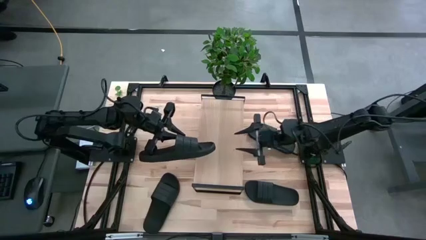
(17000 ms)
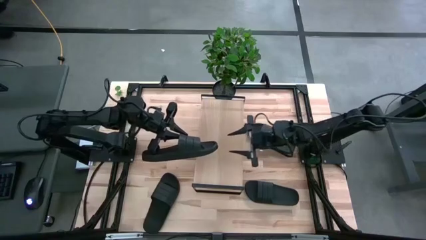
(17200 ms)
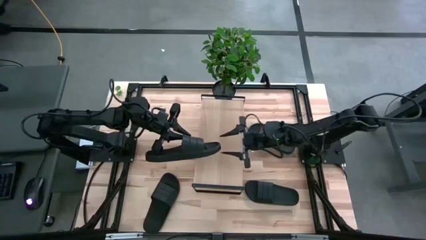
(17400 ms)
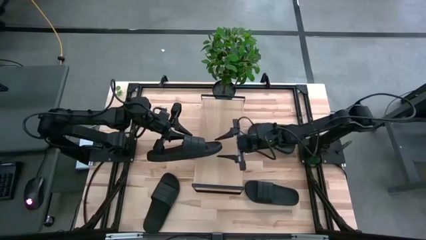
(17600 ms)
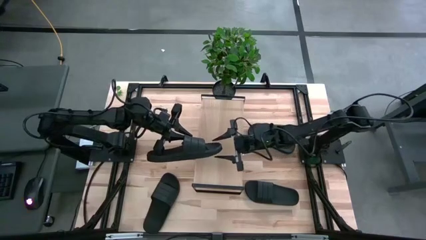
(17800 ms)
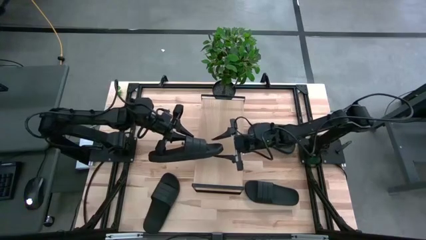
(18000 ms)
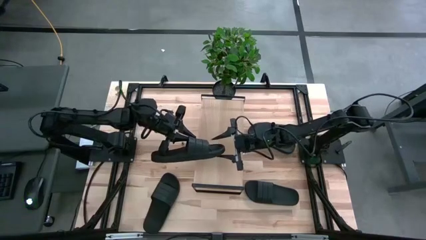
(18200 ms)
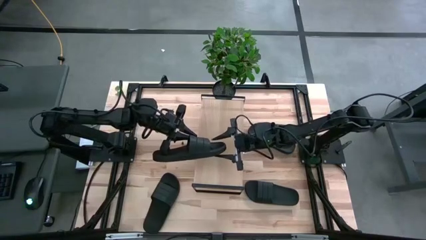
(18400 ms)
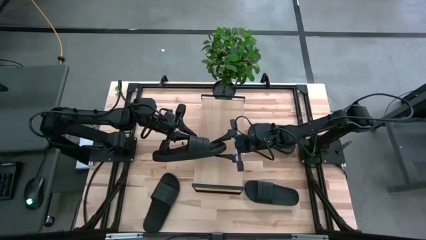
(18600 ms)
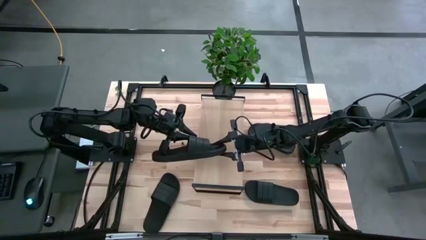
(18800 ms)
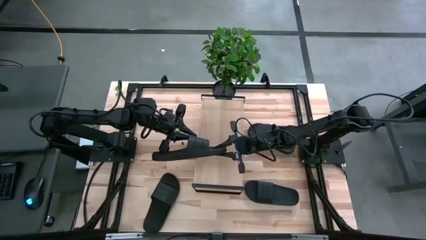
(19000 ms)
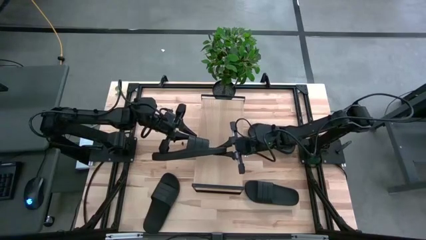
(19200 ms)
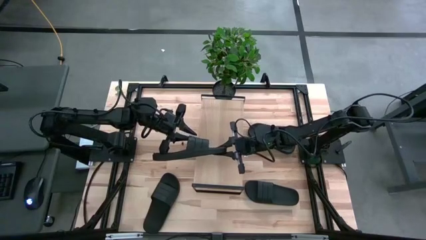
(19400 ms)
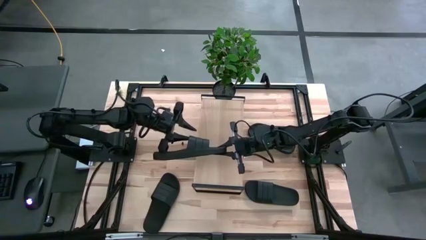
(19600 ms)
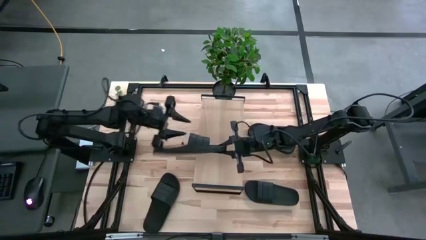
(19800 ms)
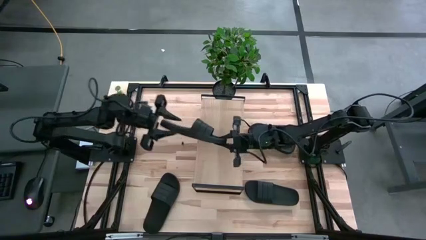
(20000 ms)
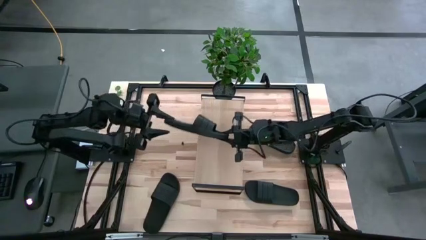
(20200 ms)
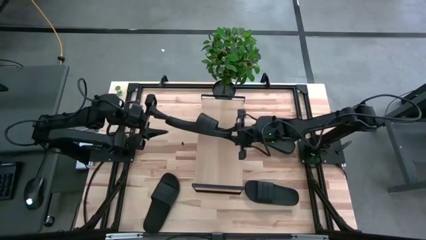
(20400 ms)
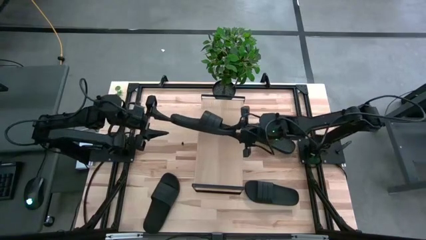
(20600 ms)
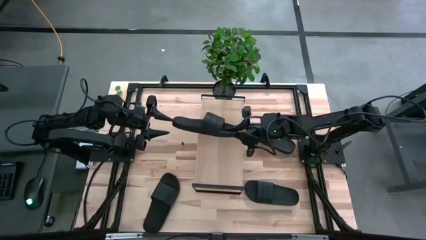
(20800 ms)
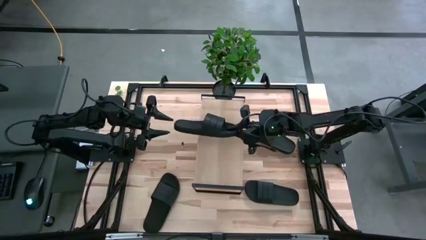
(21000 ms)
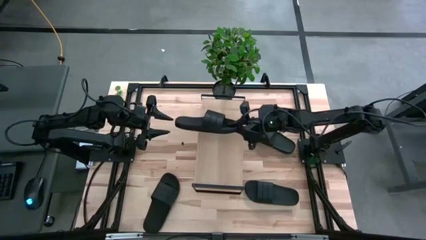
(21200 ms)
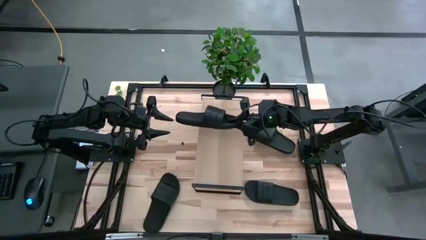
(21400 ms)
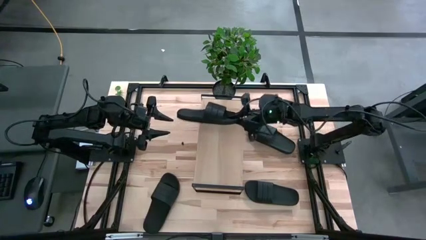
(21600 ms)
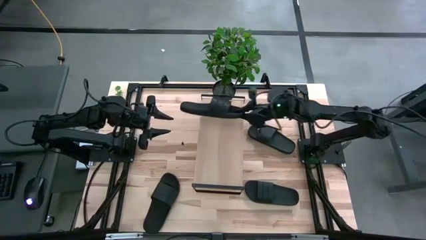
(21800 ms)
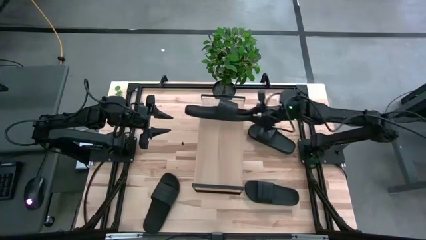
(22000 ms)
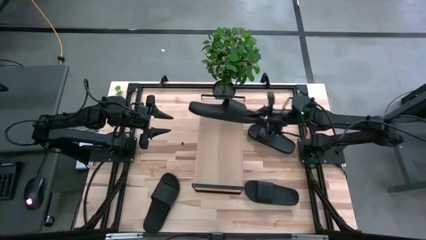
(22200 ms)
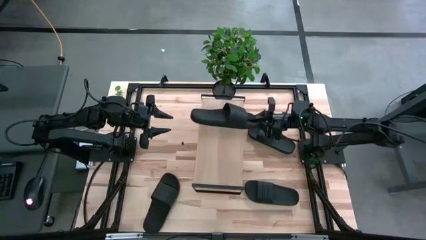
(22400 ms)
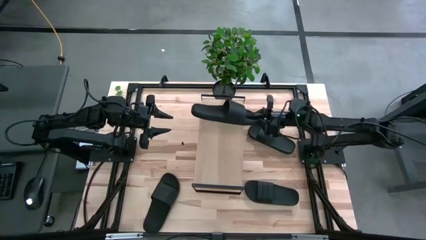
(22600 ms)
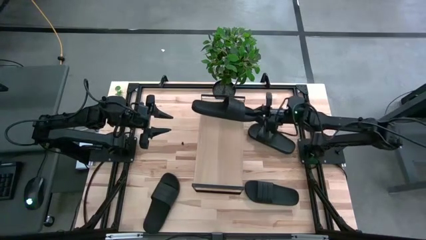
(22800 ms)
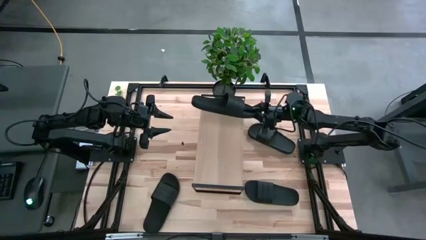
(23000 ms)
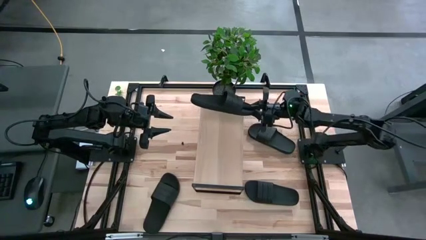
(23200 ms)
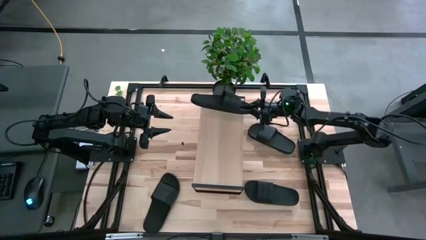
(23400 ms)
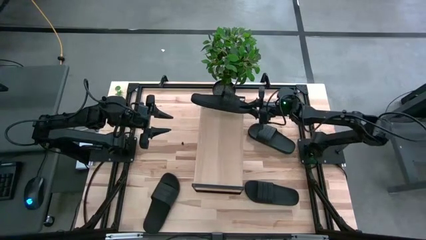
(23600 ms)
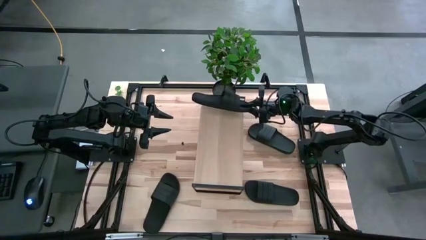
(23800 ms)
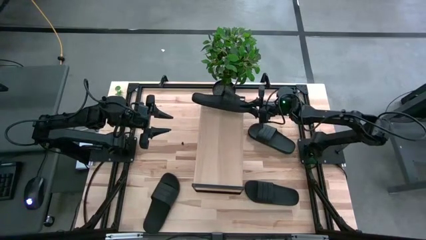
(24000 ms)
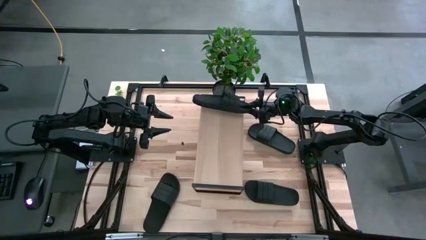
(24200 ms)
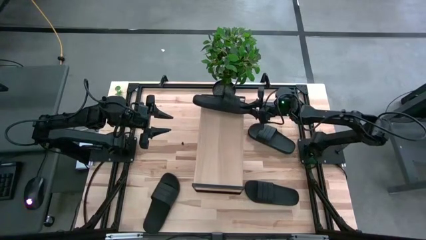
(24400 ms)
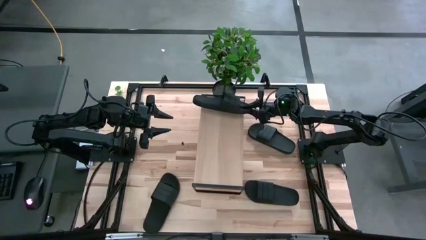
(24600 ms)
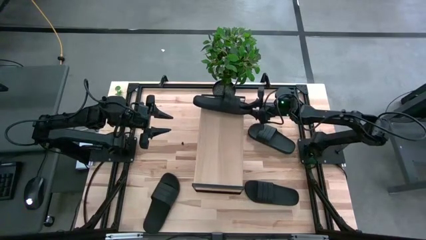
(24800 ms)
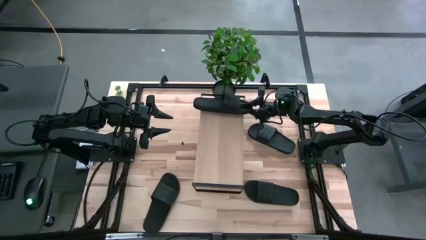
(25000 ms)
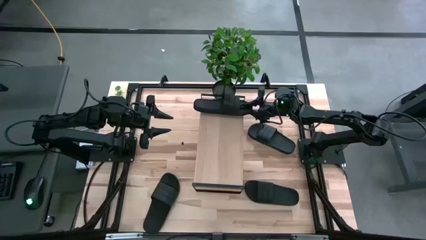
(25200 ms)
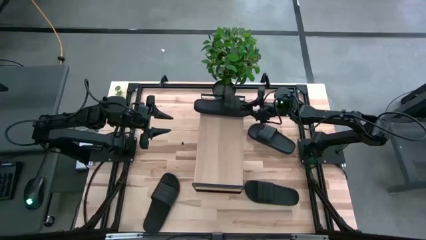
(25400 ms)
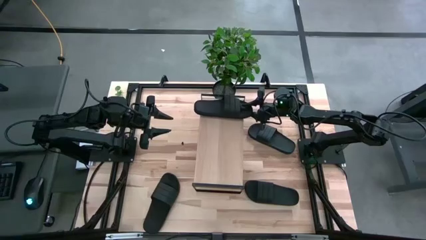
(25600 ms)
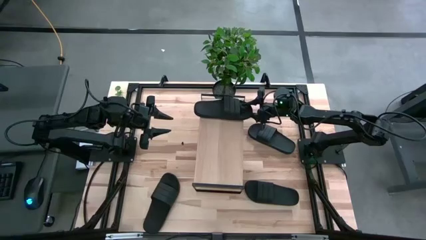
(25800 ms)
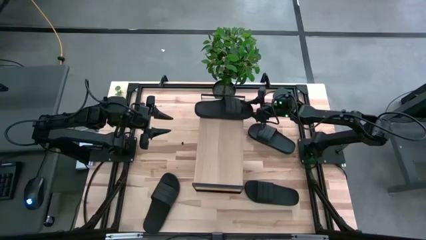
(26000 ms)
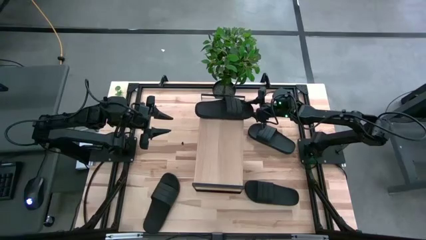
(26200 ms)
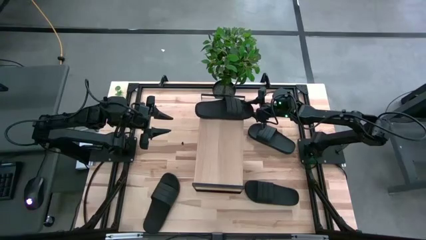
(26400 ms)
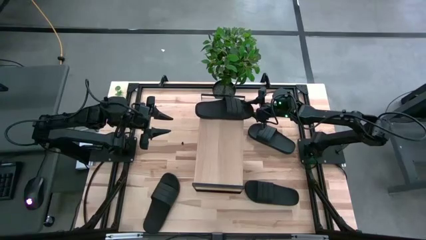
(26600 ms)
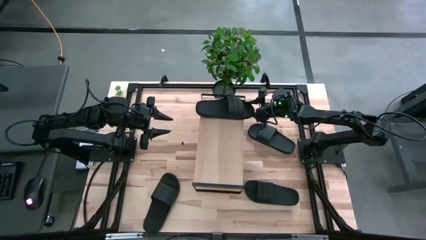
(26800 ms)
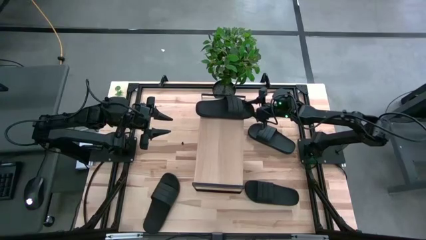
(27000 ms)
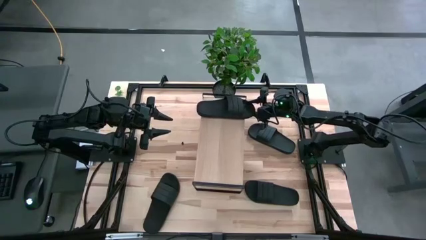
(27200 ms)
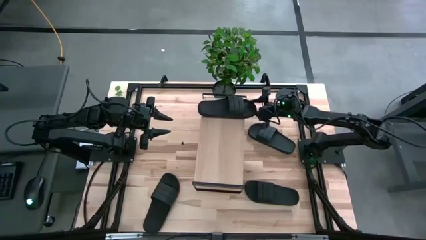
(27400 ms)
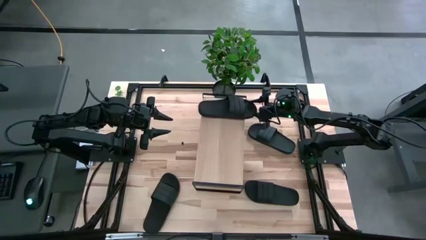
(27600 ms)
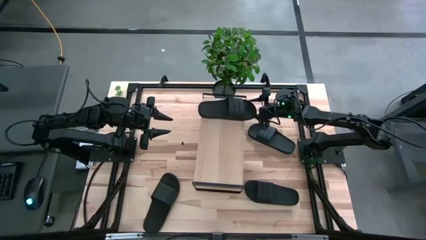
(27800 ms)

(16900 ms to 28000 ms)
Task: Pick and place slides into the shelf
Put the slide on the shelf
